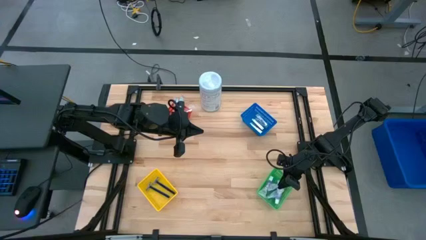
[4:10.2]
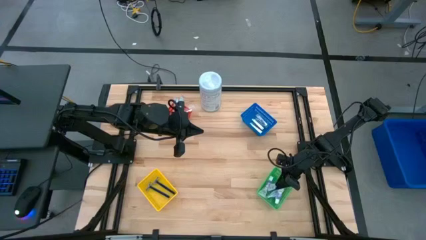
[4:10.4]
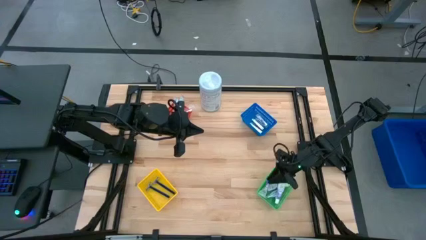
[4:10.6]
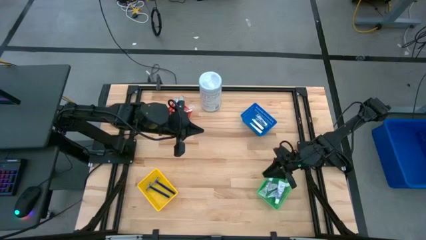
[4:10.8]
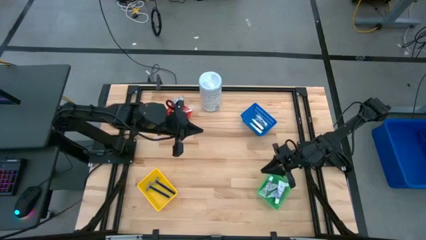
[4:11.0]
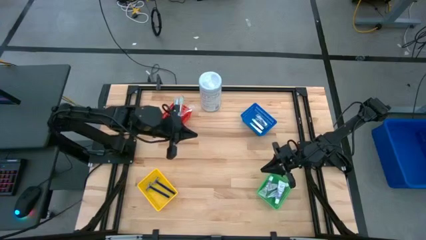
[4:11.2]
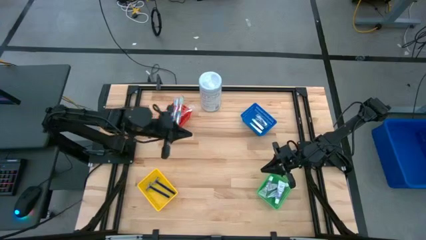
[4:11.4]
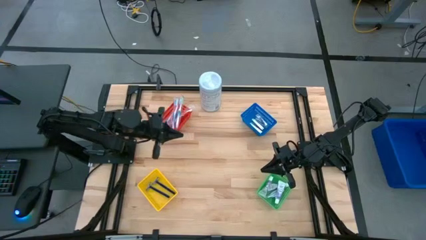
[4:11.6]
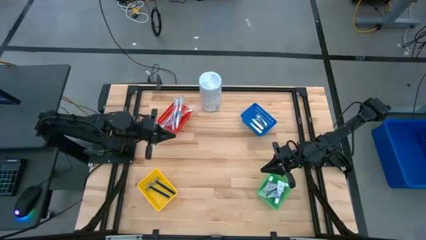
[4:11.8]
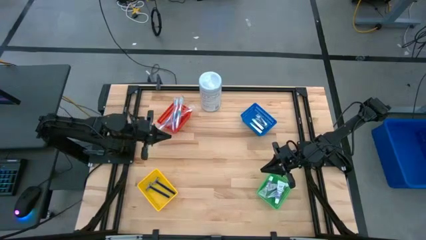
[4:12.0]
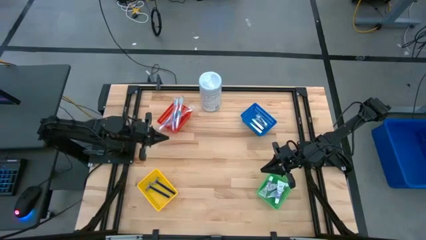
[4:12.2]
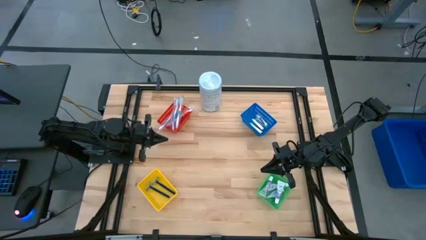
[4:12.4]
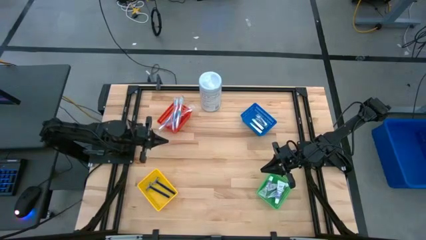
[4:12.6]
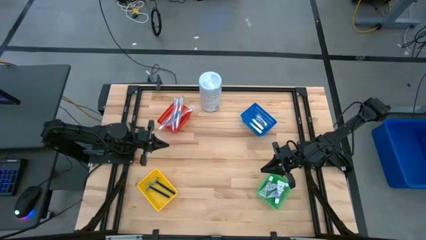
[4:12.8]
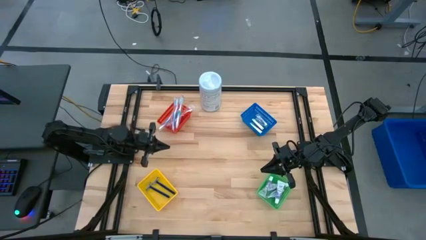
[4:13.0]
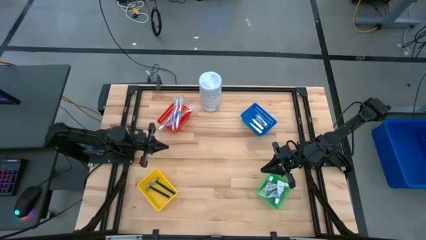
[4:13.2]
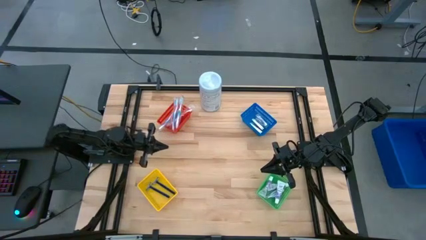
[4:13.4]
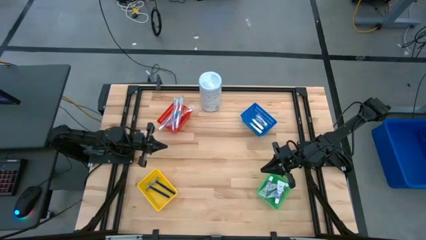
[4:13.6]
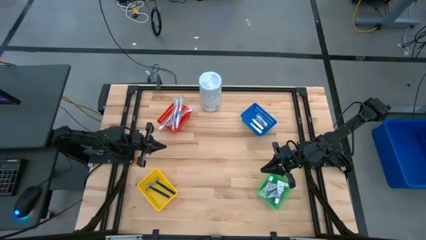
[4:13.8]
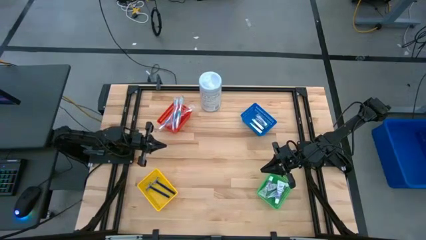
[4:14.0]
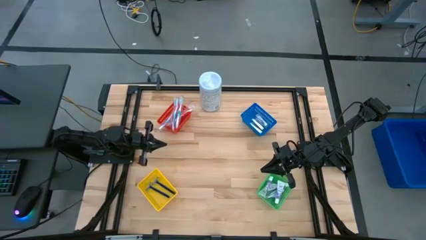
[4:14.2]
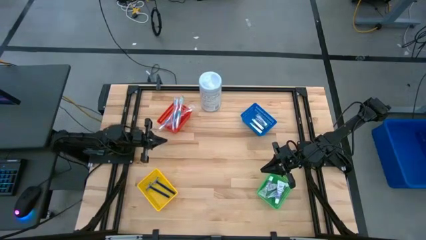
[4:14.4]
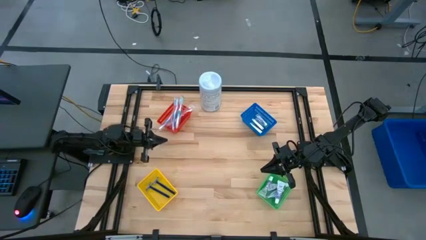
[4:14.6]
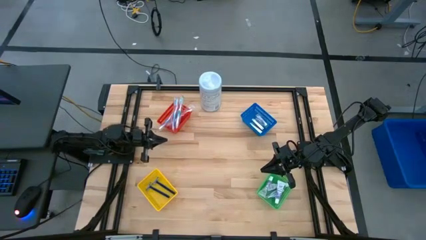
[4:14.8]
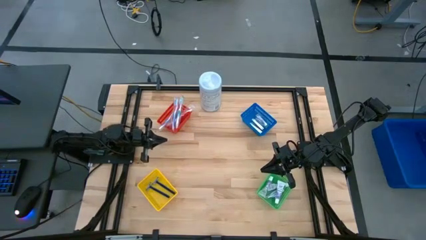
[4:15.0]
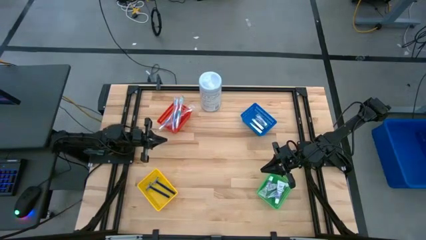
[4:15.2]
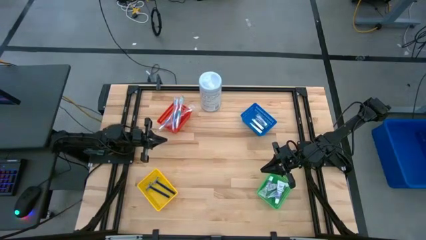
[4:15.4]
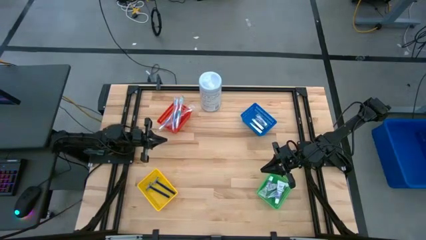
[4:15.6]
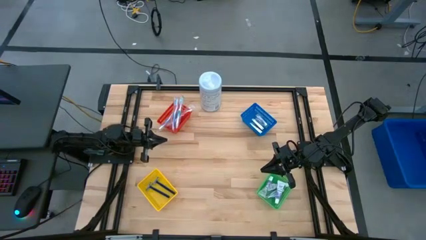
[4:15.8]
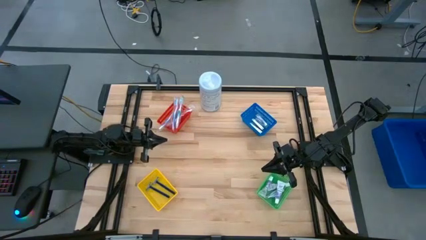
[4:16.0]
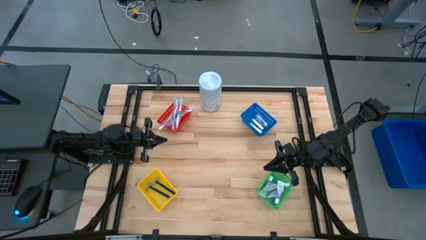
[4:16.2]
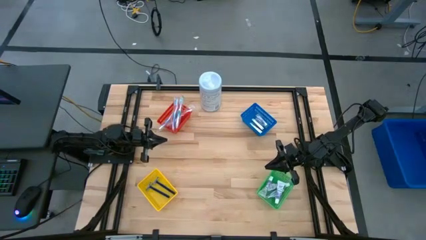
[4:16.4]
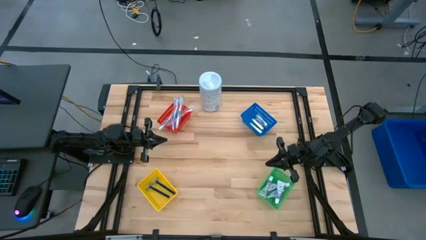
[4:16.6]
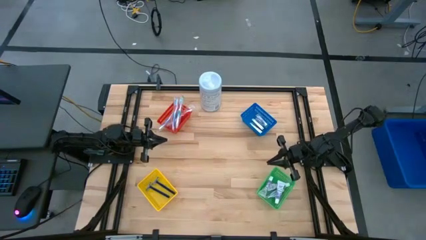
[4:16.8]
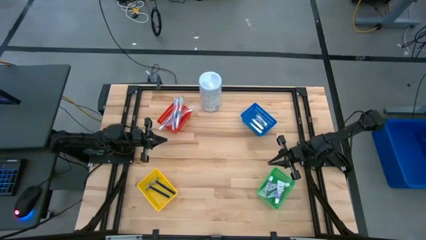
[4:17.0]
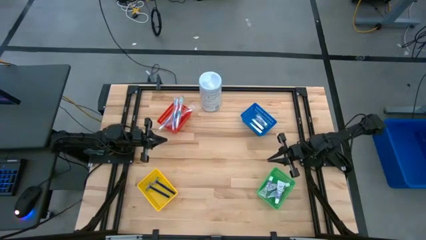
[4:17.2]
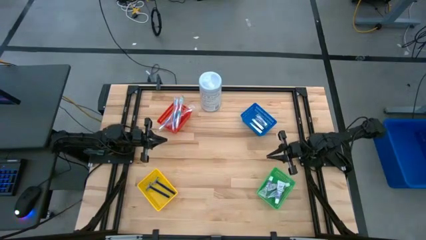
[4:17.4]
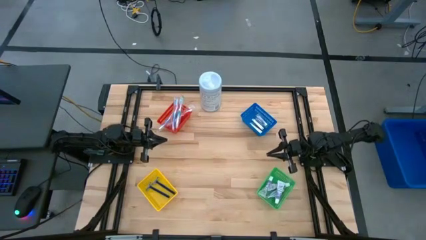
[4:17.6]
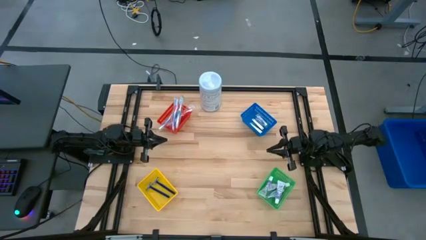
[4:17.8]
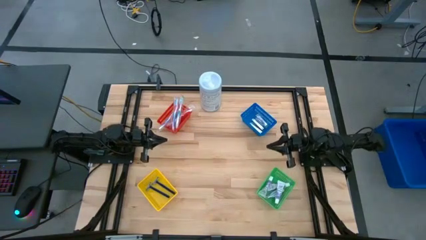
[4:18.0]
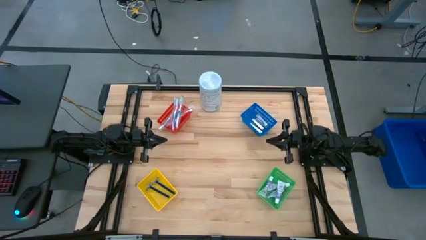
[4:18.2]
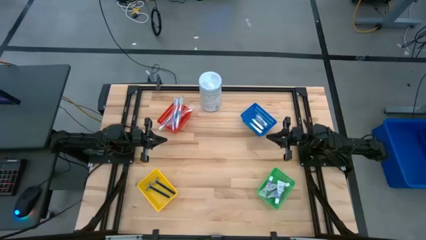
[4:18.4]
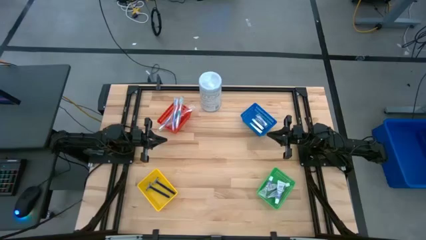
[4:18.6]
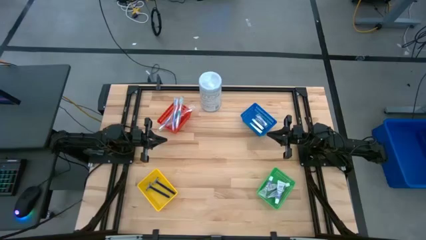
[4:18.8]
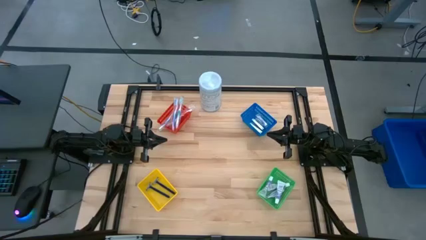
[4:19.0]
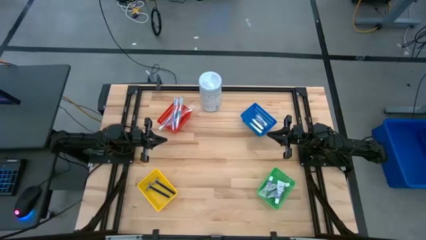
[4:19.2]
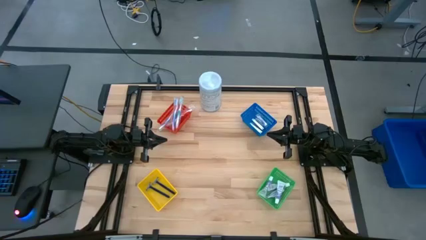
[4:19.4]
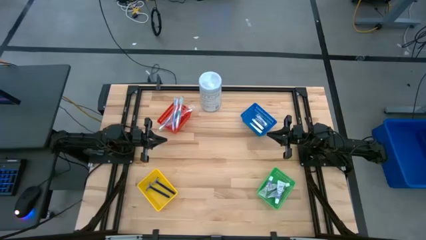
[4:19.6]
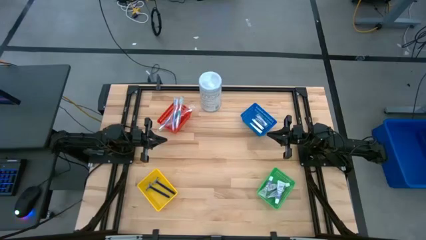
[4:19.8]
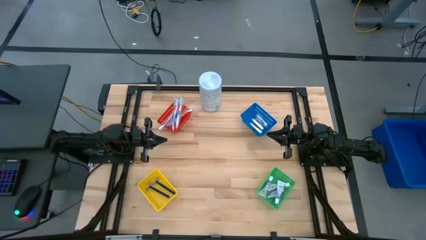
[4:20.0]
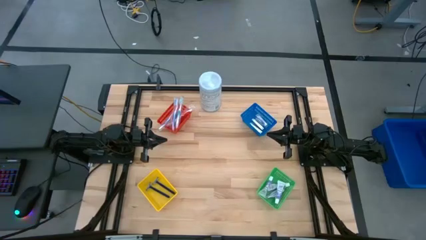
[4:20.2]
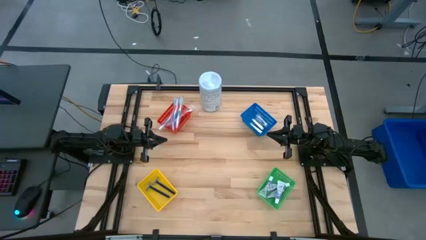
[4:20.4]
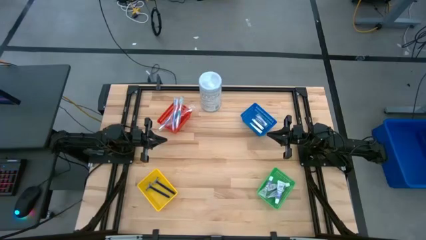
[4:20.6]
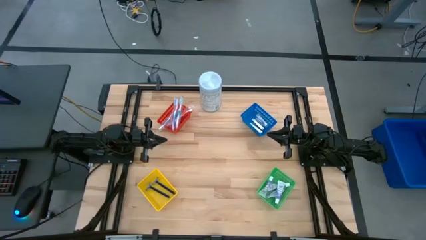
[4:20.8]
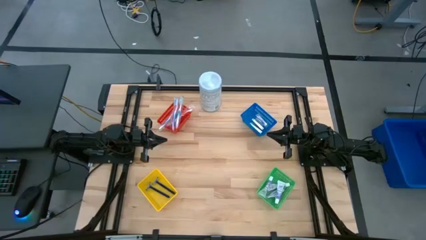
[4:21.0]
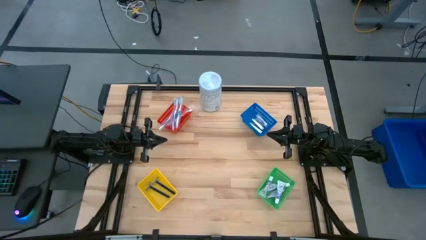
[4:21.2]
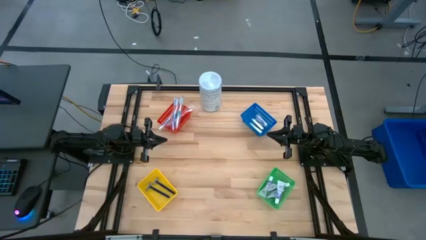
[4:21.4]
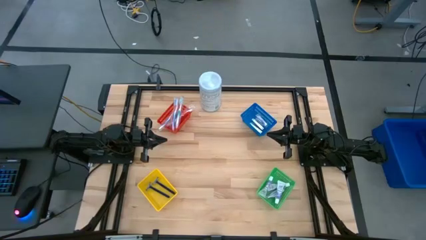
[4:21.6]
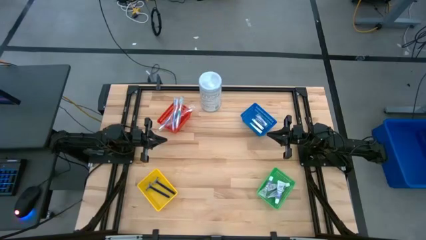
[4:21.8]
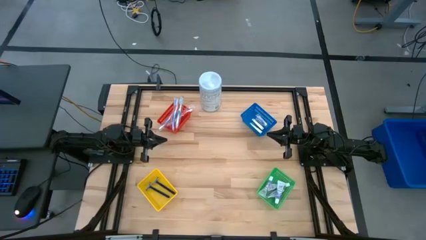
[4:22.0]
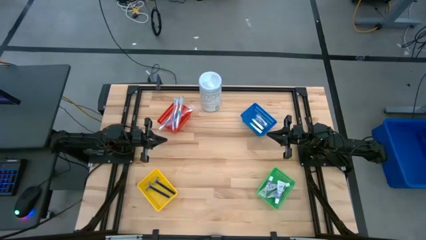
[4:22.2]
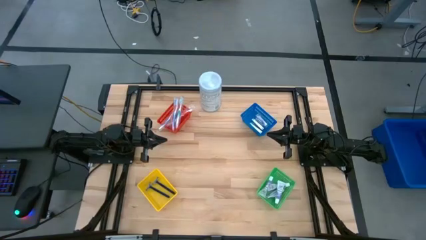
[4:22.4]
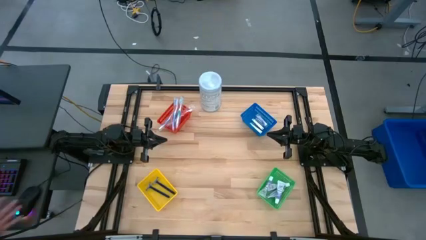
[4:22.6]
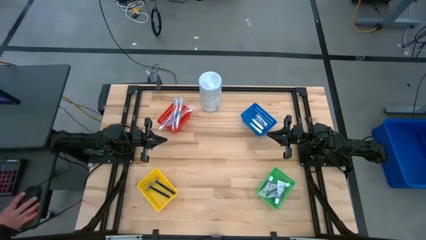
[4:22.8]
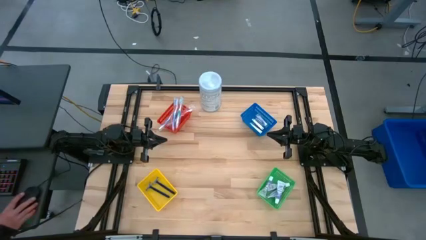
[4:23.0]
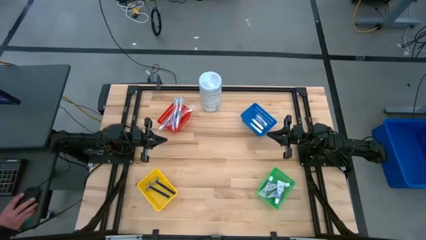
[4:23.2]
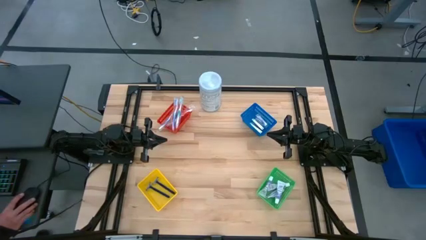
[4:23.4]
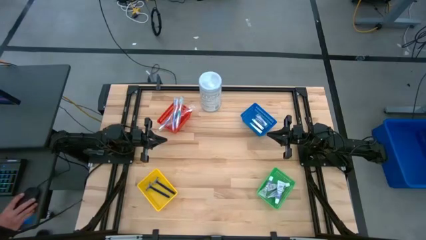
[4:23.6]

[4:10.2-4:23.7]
Task: Pick & Place Travel size toiletries
Return to Home Position

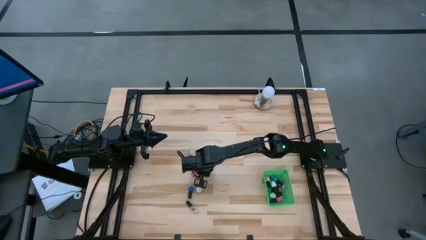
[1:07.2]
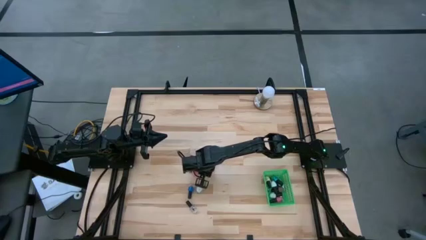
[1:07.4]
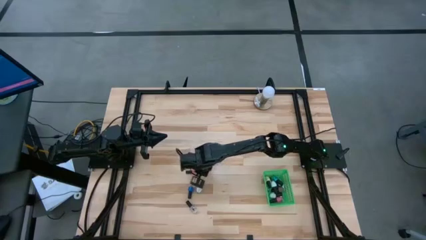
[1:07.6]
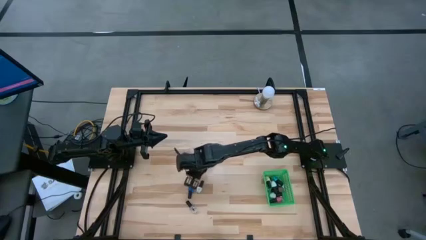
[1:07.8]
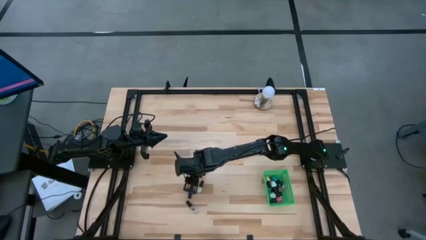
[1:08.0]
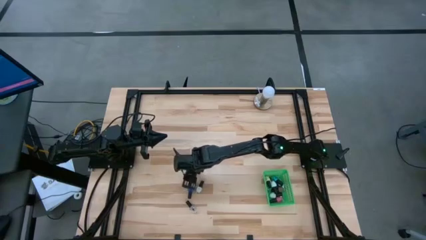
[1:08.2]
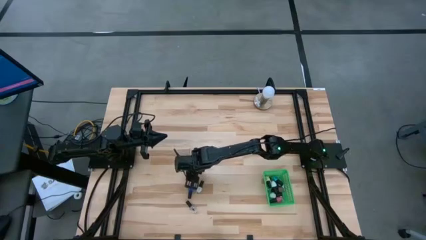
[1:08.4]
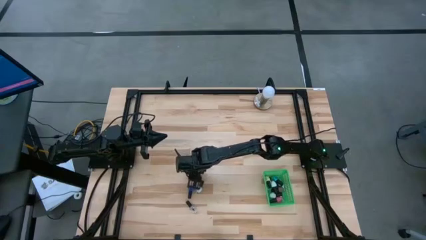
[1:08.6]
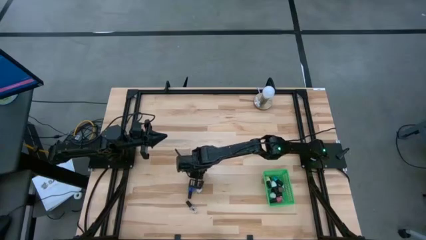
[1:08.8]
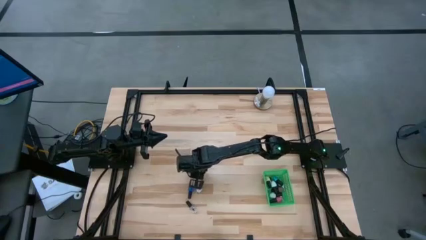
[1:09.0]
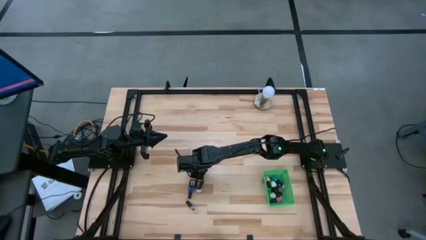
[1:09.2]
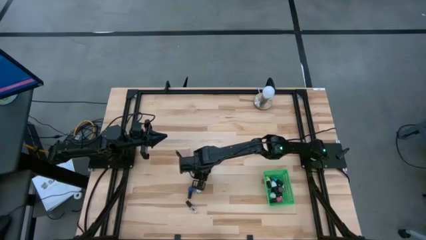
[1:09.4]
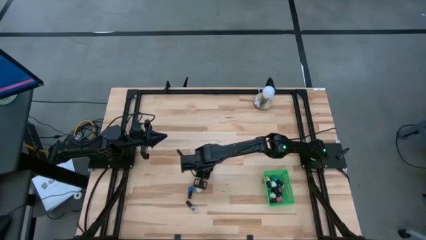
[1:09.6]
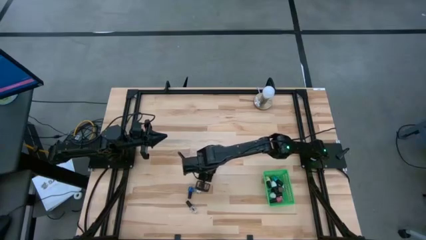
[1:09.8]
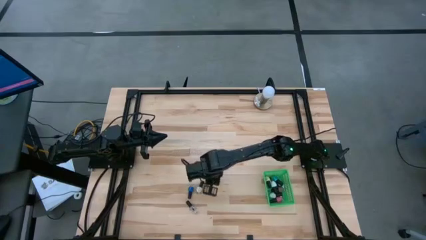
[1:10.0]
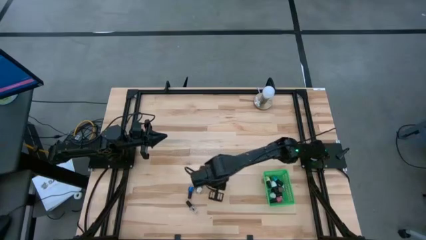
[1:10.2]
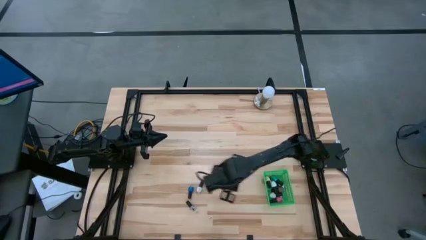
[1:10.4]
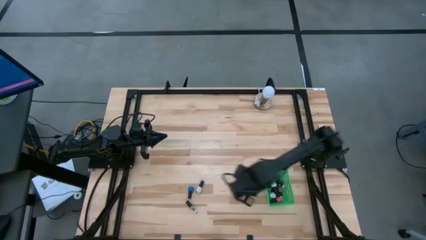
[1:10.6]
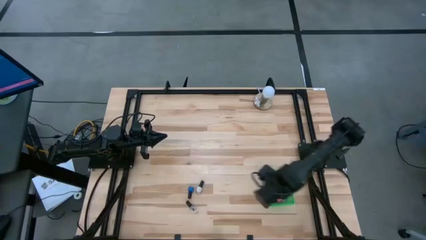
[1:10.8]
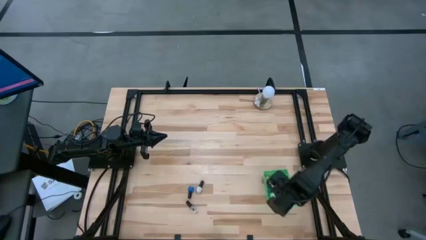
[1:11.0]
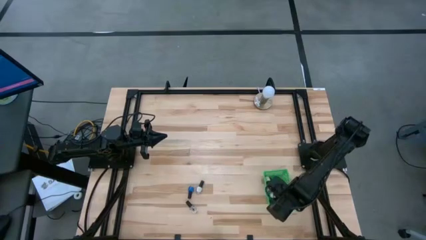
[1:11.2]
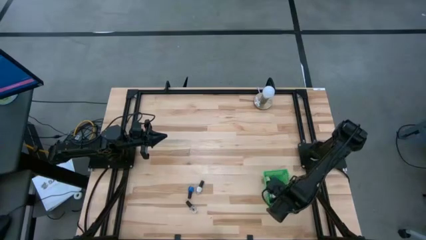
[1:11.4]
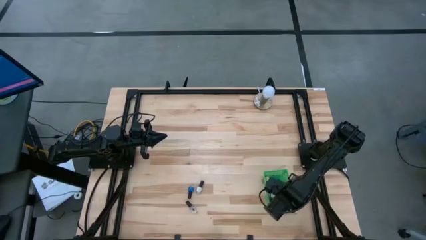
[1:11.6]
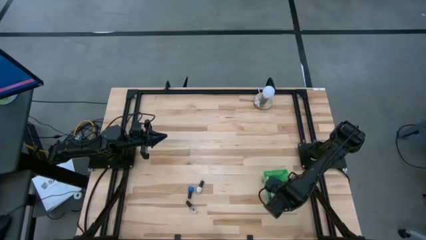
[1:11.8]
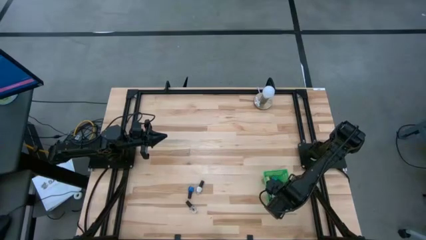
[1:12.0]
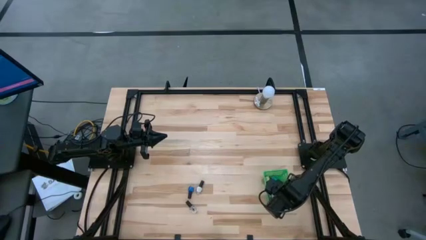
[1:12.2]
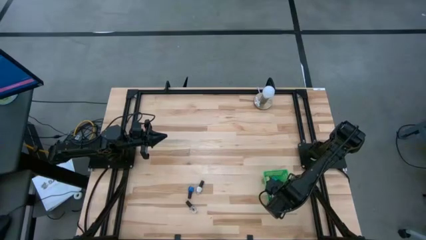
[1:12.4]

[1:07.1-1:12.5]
Task: Pick & Place Nail Polish
Put the pink nail polish into the green bin
